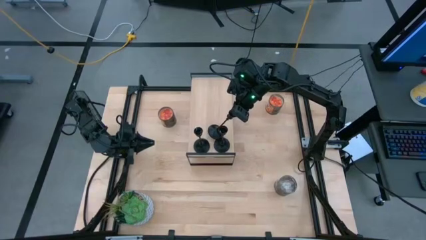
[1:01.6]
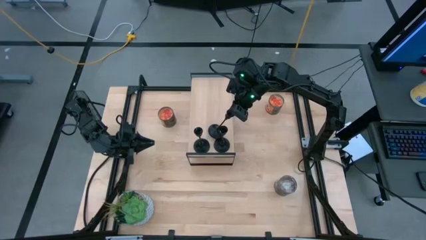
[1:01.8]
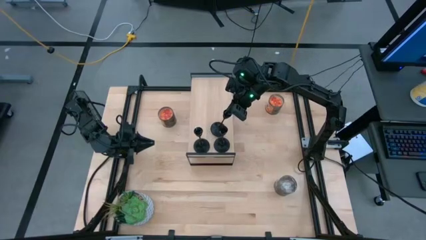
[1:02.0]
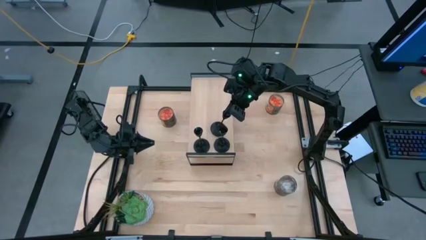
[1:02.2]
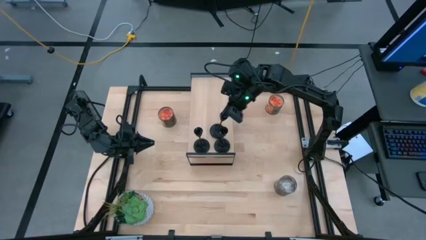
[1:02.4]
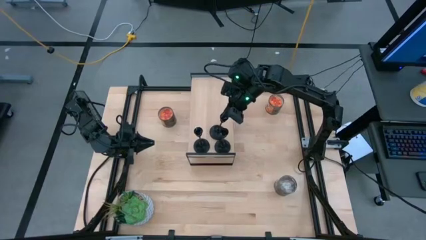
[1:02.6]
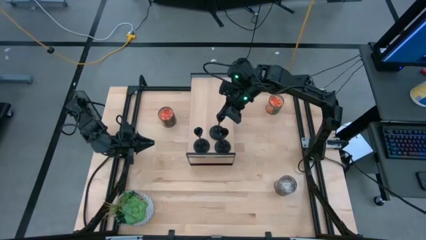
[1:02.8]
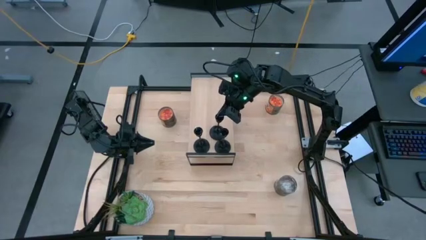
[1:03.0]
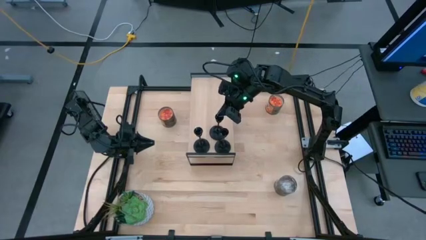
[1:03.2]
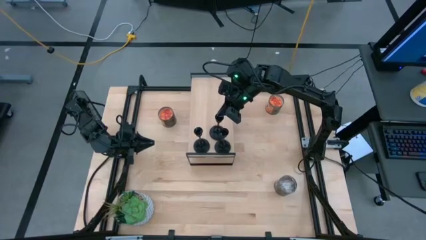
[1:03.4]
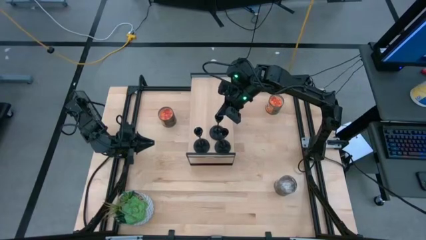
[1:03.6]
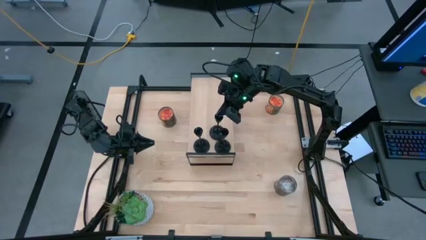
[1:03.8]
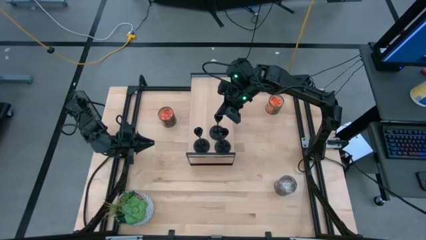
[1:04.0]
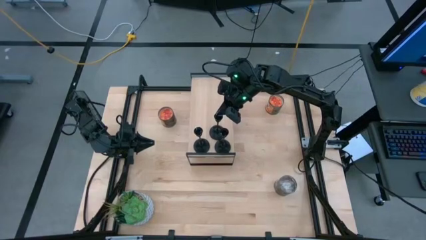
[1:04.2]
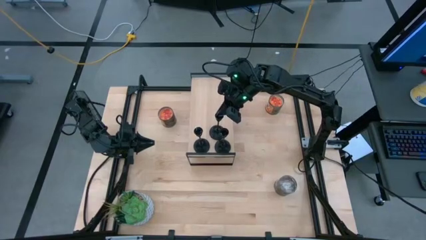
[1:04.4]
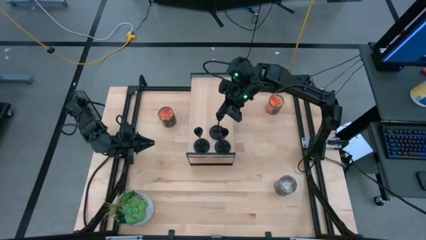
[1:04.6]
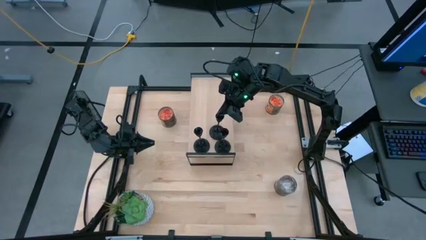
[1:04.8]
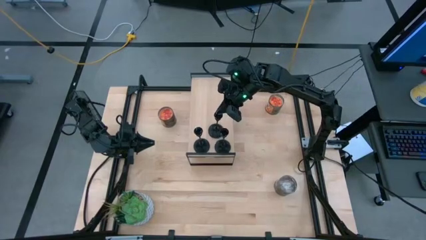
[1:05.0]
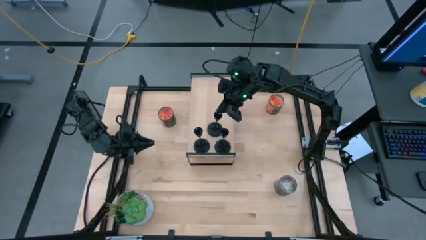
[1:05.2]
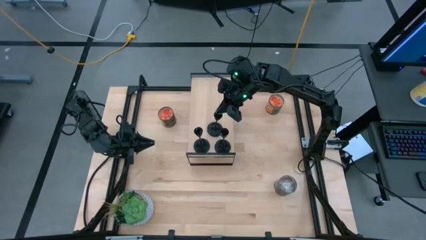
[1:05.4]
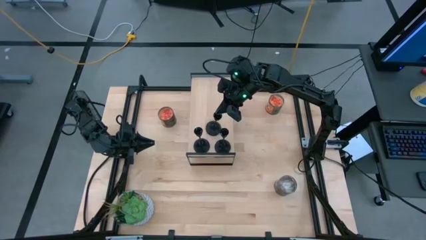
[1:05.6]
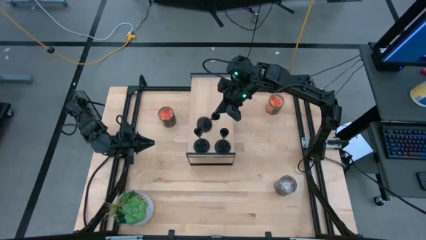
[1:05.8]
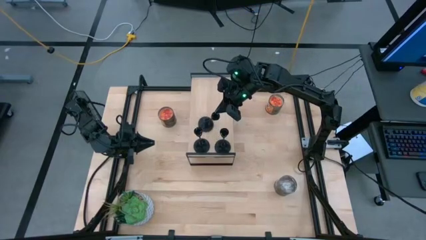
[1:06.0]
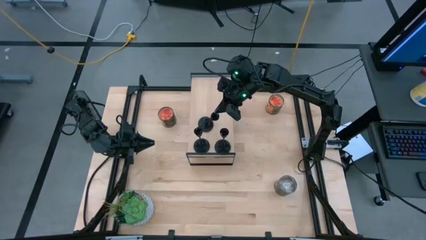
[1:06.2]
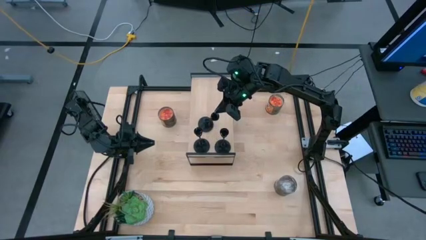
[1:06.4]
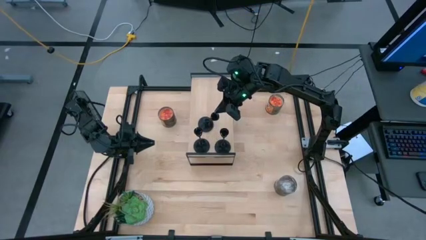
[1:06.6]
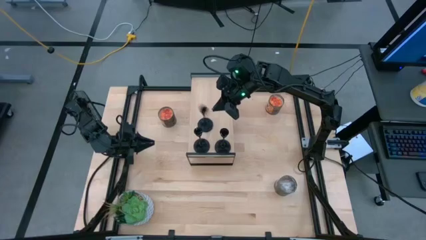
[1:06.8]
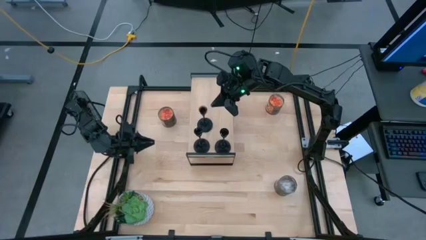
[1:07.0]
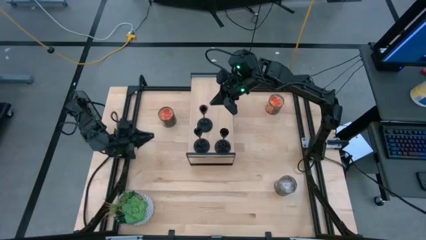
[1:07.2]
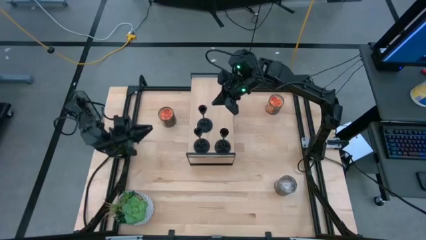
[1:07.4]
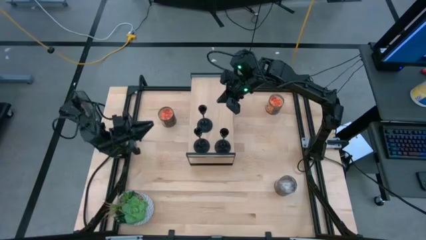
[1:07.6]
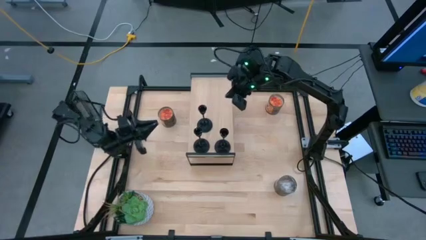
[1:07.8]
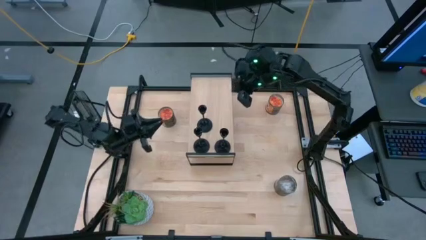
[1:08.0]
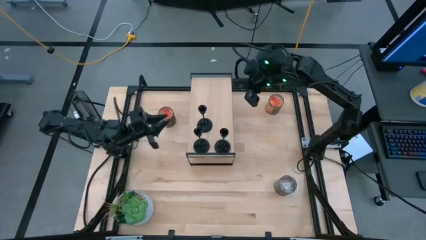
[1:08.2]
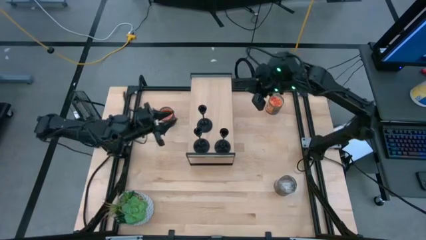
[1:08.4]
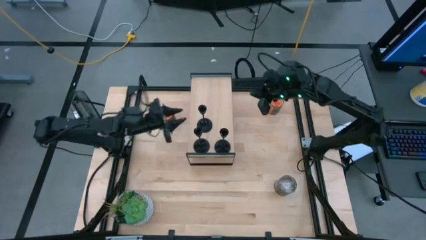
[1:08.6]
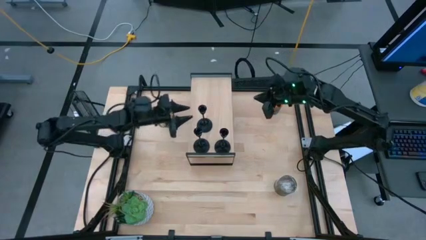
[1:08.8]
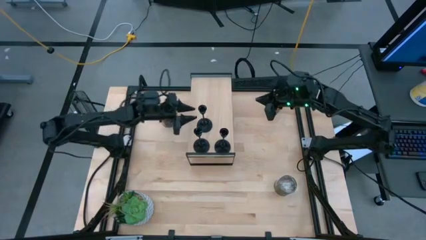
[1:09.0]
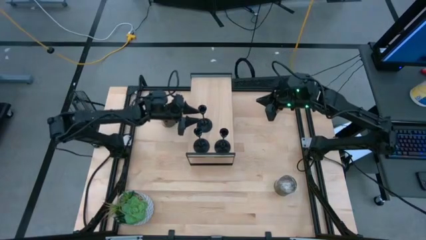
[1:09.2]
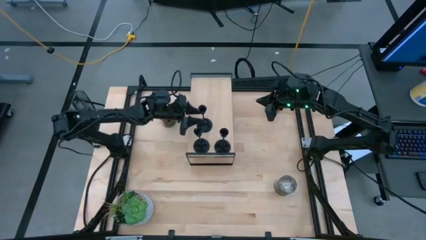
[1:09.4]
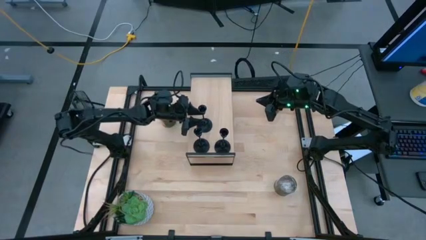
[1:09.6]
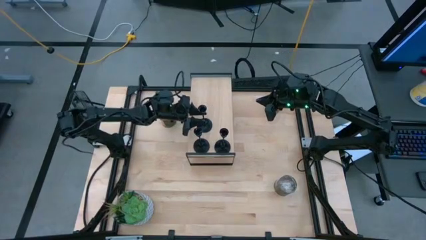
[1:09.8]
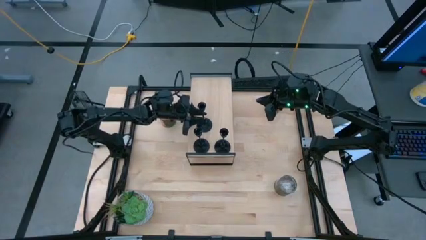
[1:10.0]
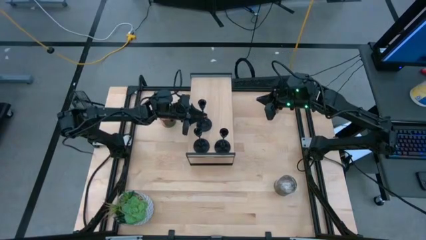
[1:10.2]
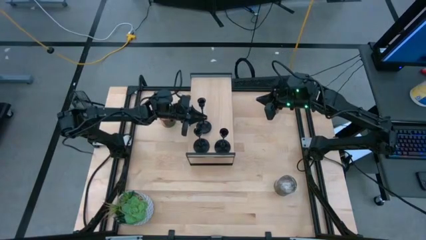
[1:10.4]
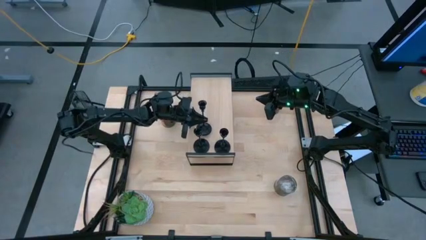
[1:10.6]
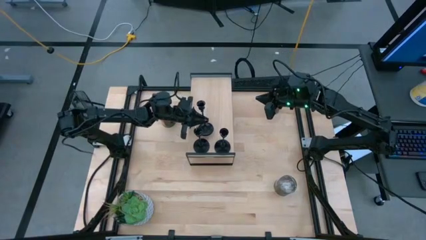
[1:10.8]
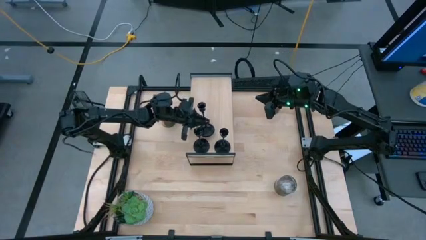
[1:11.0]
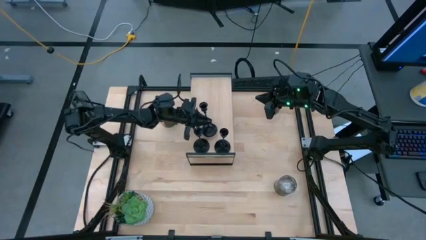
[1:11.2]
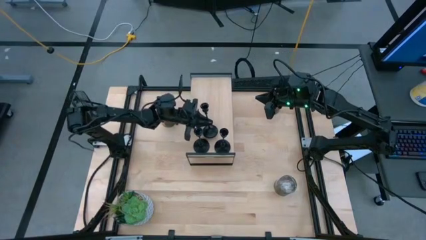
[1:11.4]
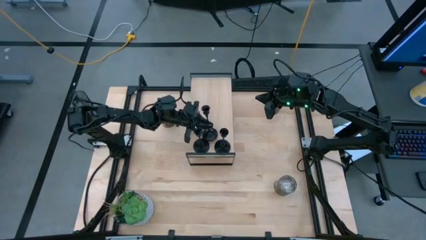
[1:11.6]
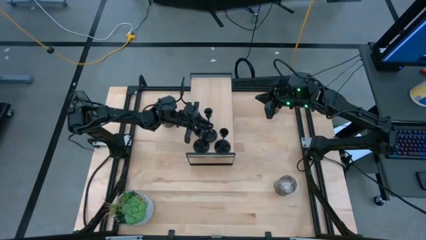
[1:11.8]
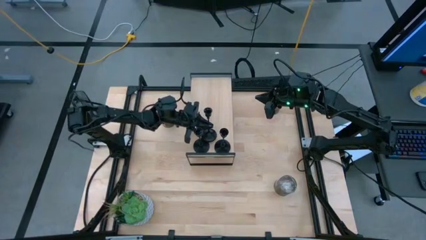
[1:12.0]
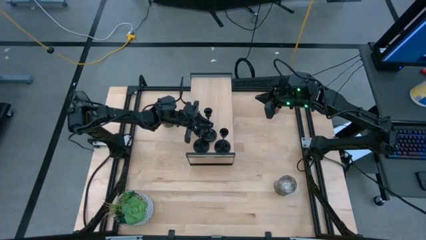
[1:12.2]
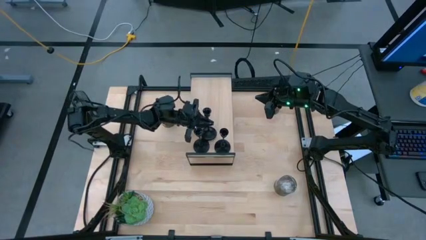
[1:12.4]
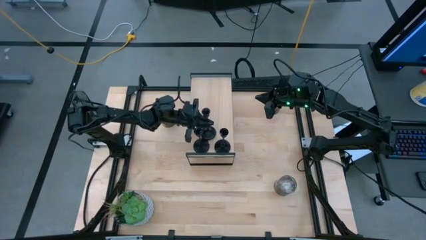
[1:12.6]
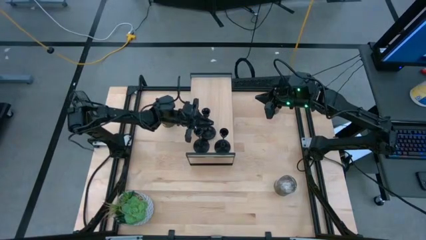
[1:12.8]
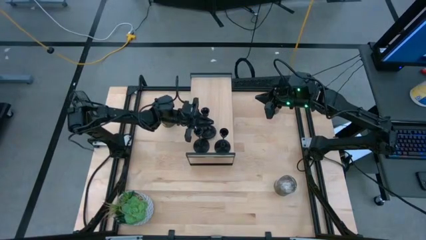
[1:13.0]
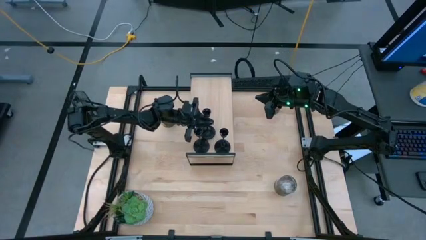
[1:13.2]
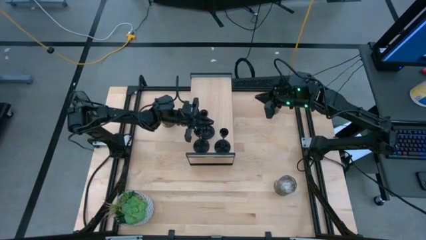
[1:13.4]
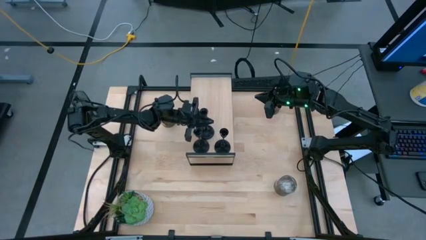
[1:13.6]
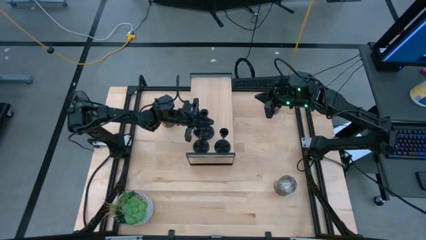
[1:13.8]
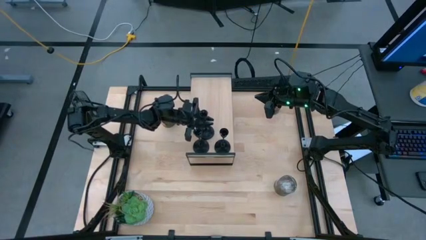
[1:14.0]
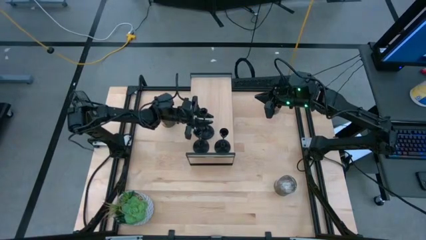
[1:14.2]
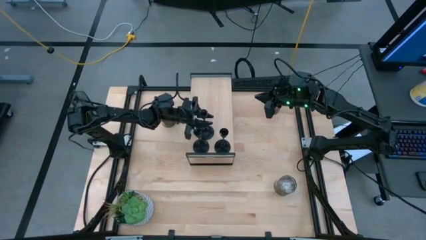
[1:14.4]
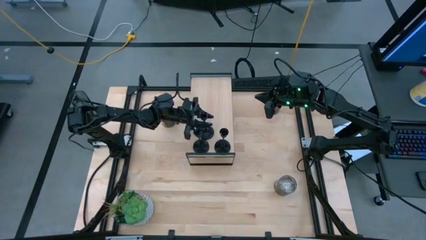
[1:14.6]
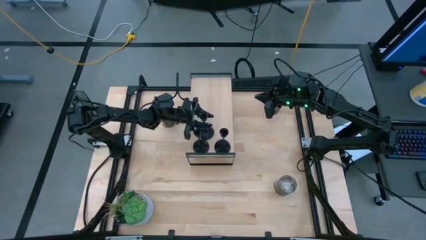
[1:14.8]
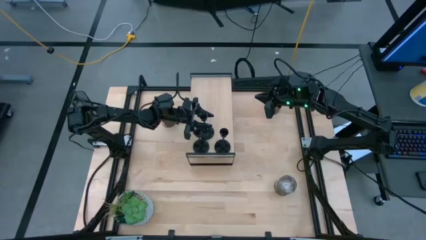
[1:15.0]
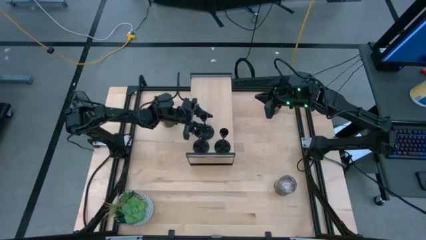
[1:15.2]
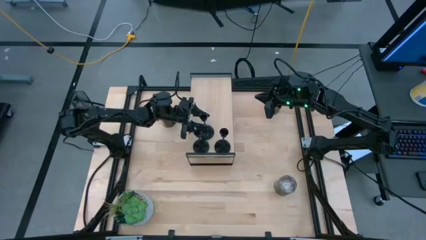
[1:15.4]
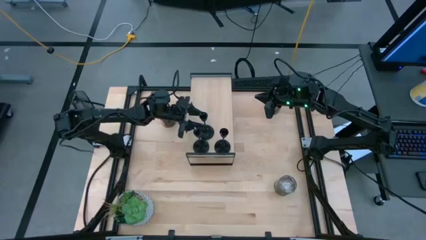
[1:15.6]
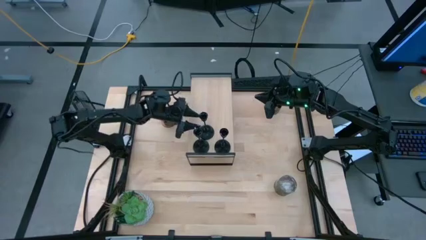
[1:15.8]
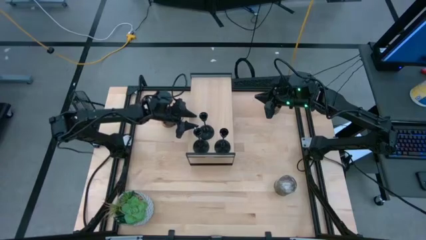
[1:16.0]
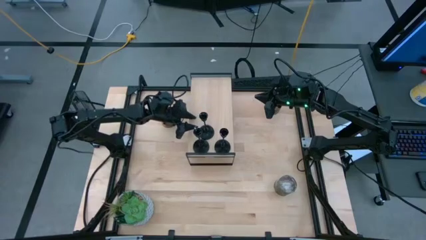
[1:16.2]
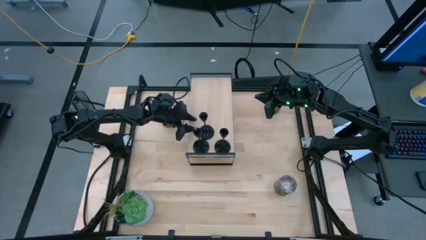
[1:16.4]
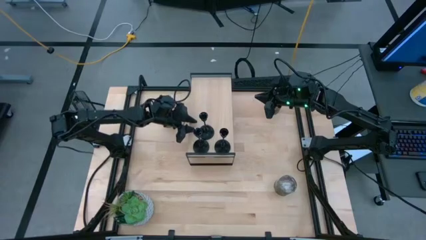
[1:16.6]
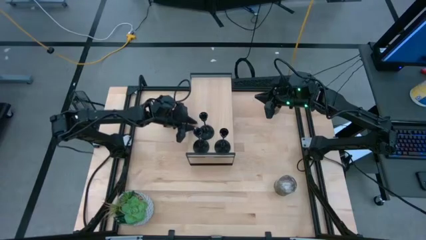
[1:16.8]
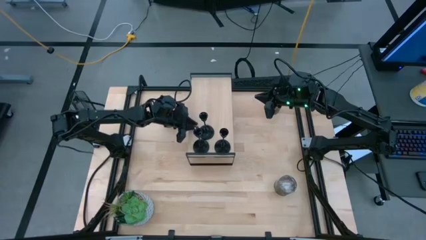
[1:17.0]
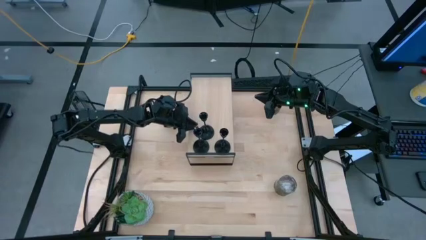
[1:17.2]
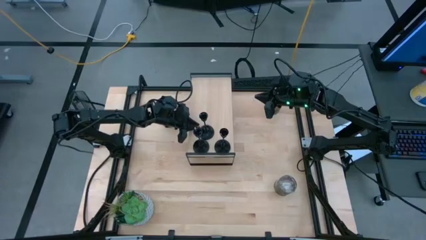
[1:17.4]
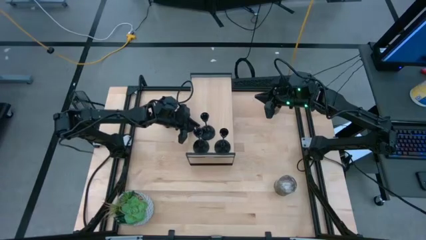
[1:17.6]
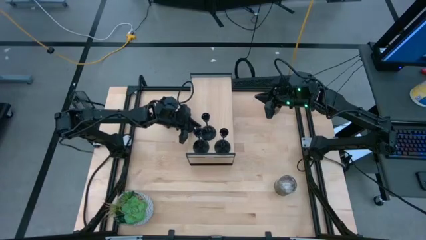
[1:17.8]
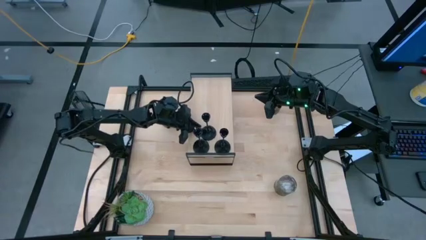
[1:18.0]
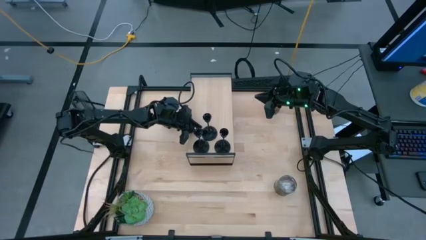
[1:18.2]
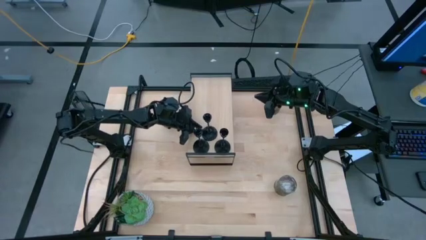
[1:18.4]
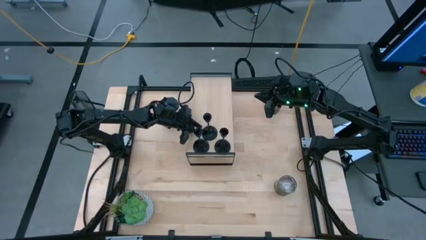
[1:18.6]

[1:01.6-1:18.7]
Task: Pick & Place candle stick holders
Put the black candle holder on the shelf
